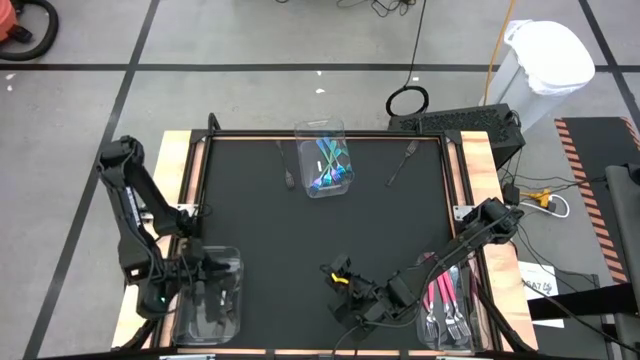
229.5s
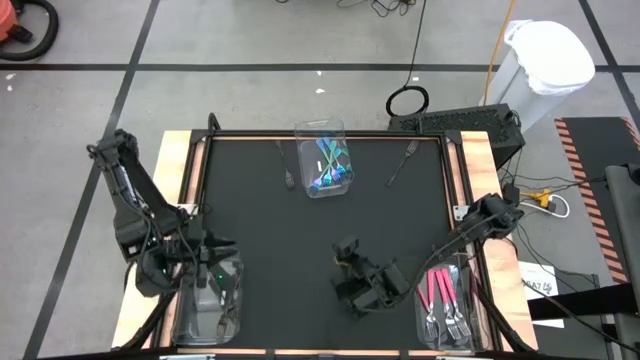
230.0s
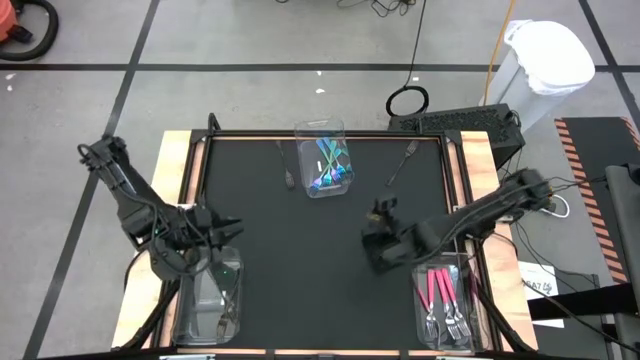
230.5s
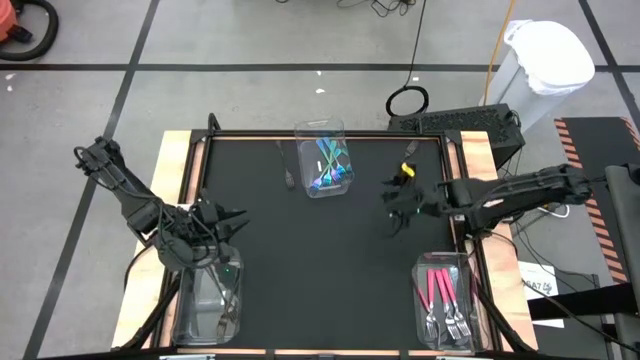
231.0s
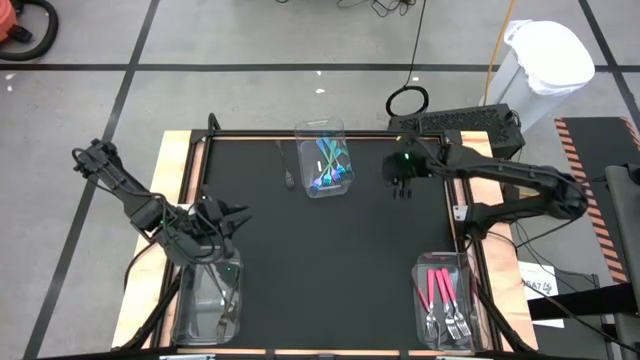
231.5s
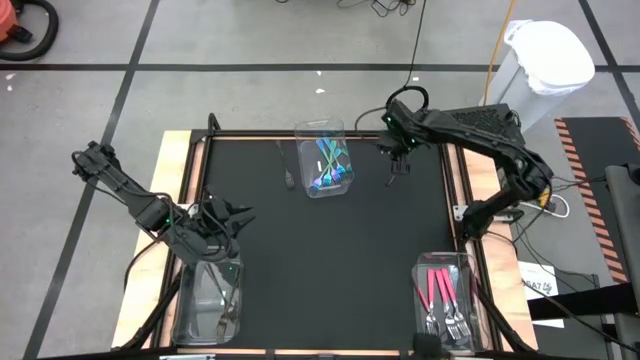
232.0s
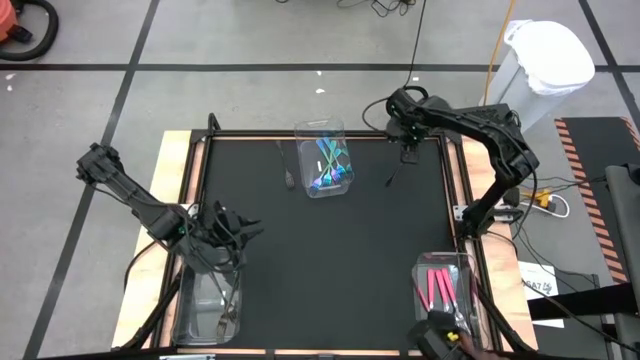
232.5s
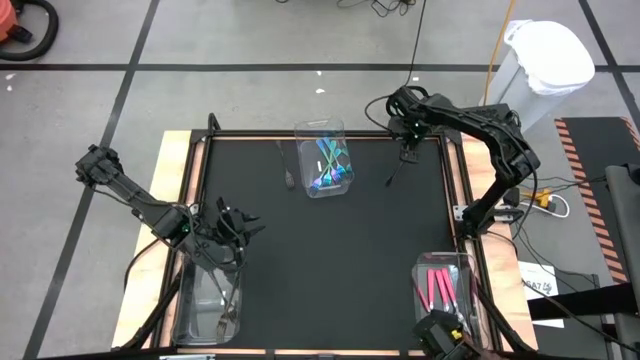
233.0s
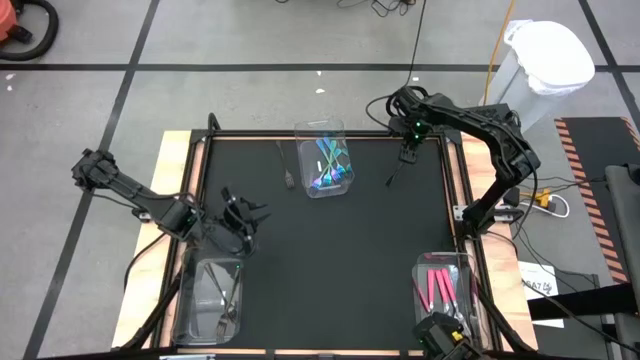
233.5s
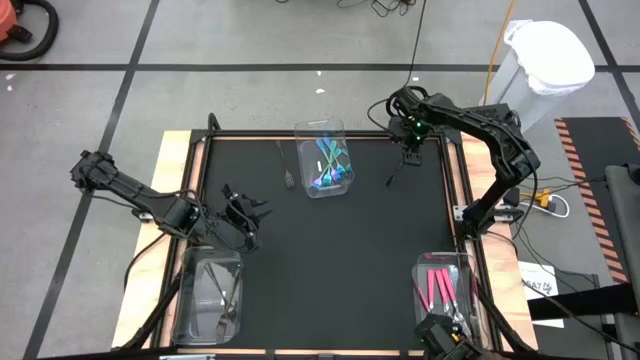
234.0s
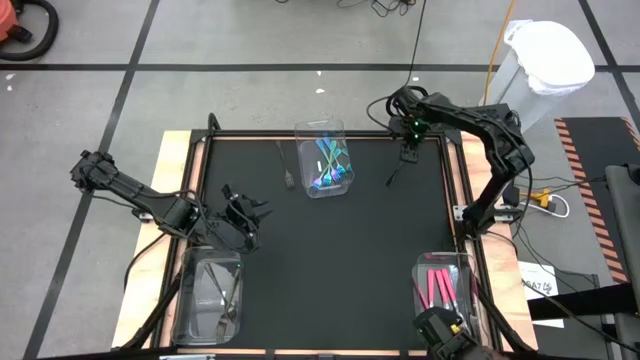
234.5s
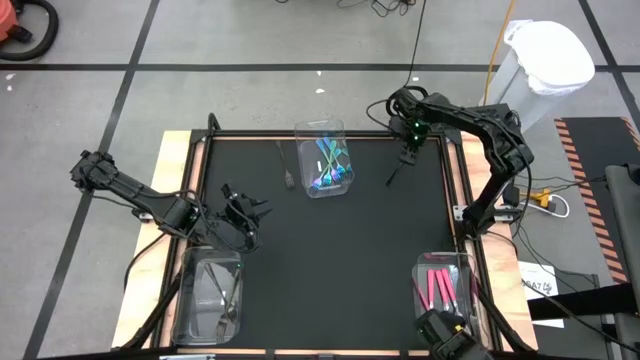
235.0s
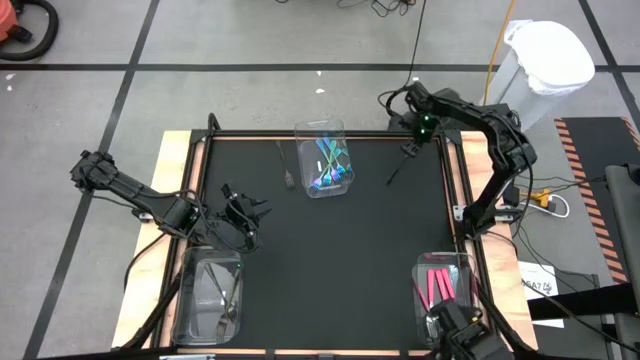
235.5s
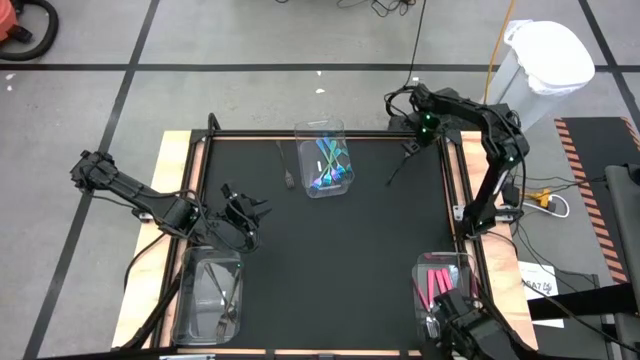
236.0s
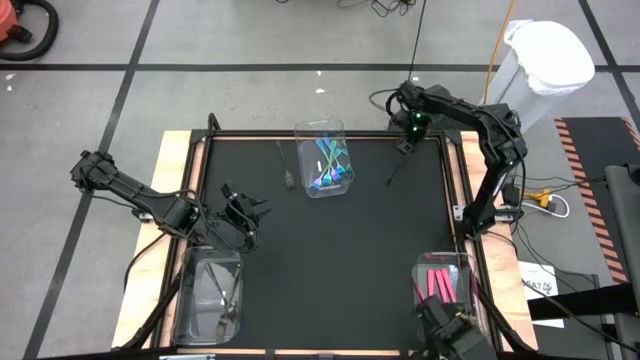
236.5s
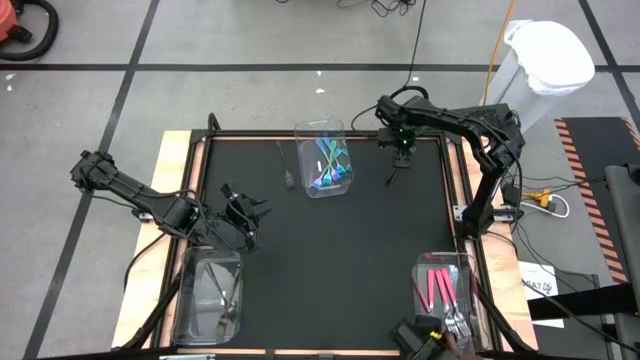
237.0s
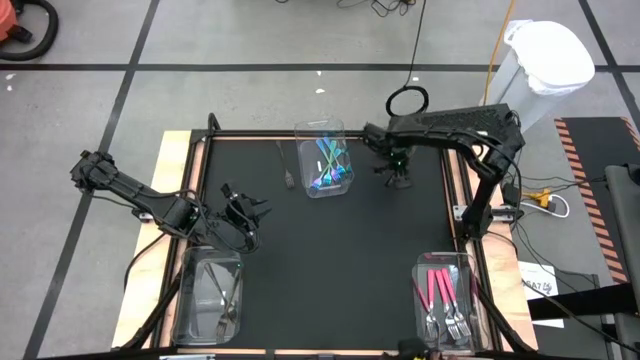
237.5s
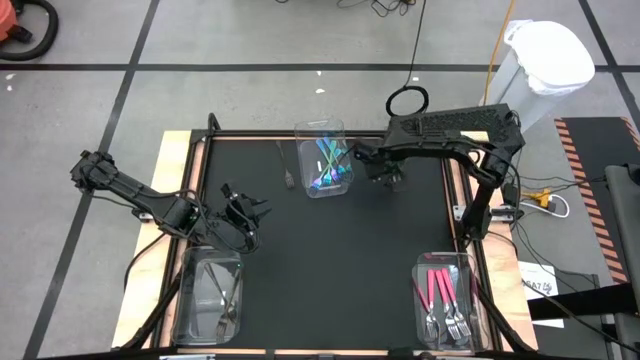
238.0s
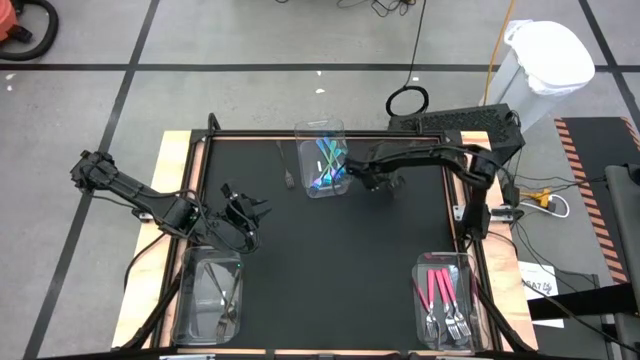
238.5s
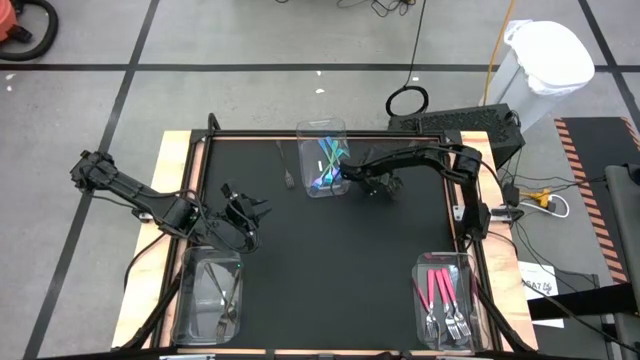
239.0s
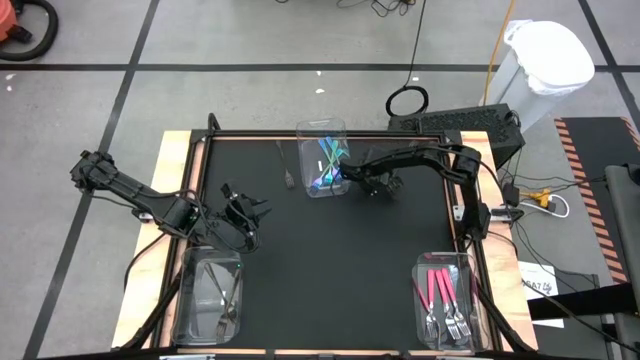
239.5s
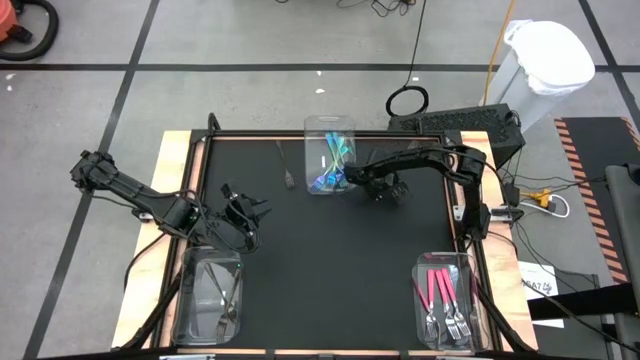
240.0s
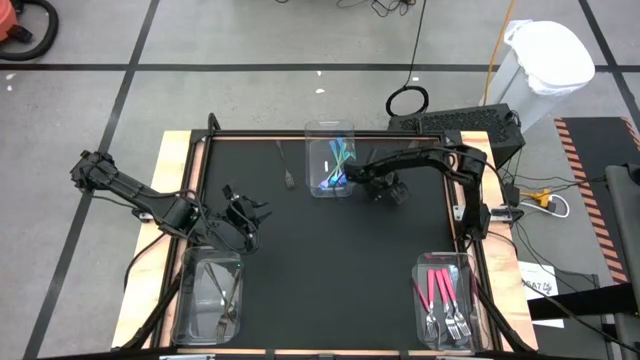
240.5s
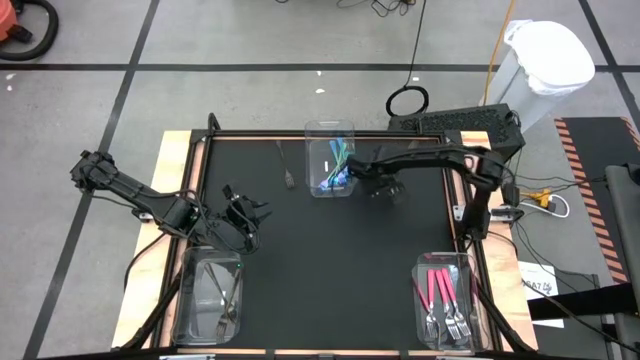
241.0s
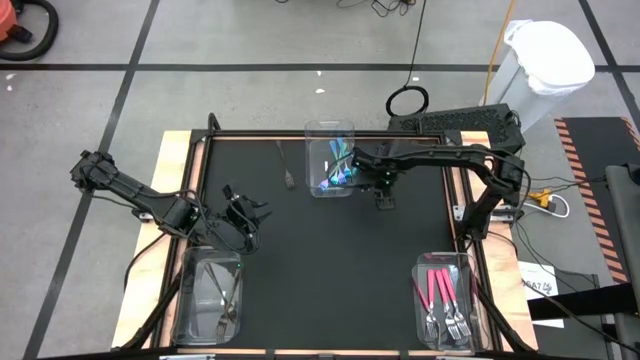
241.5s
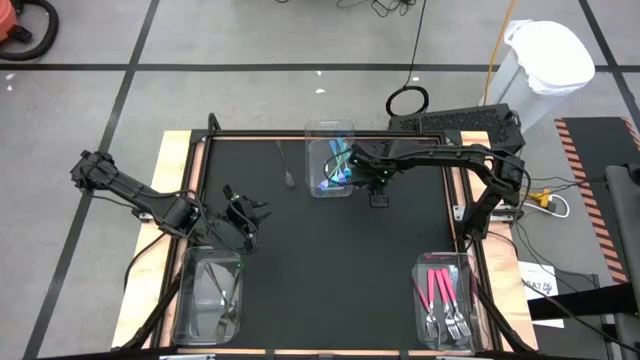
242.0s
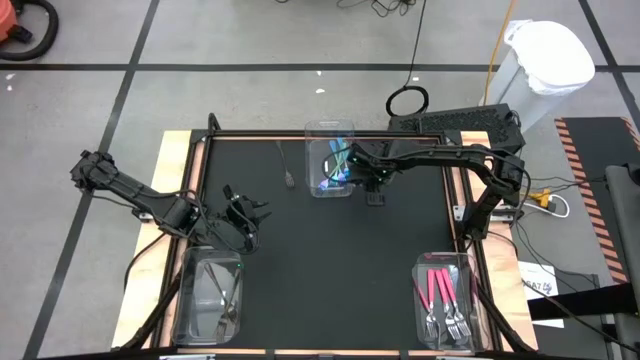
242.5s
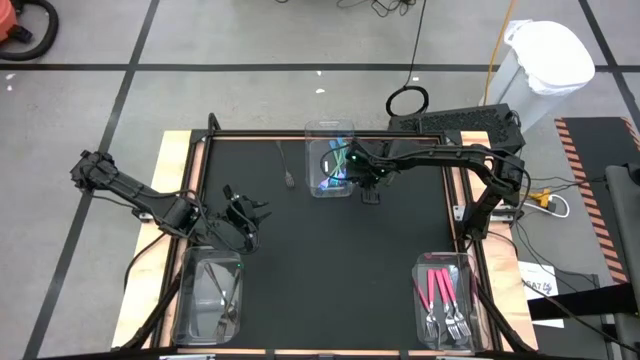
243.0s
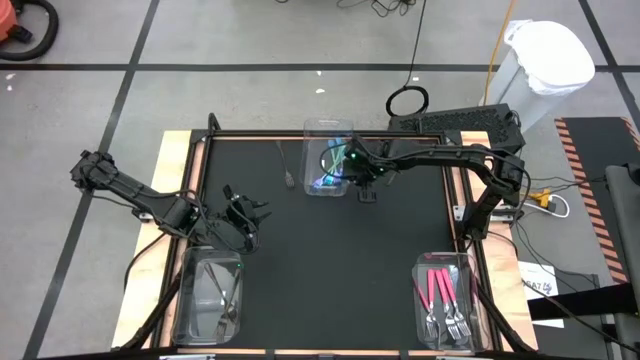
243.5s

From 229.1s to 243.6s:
Task: Sort silverware by color (type)
Adjust the top transparent bin on the table

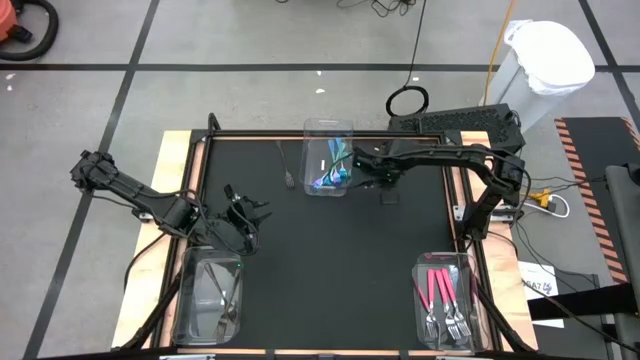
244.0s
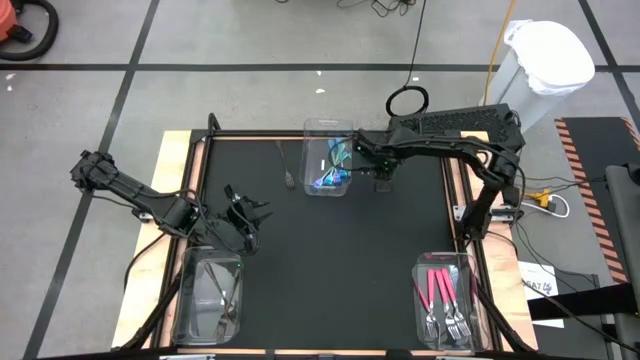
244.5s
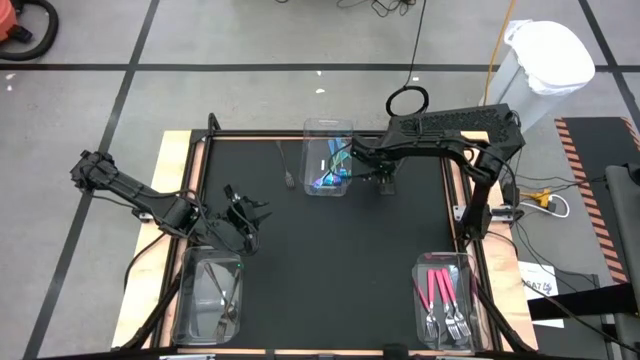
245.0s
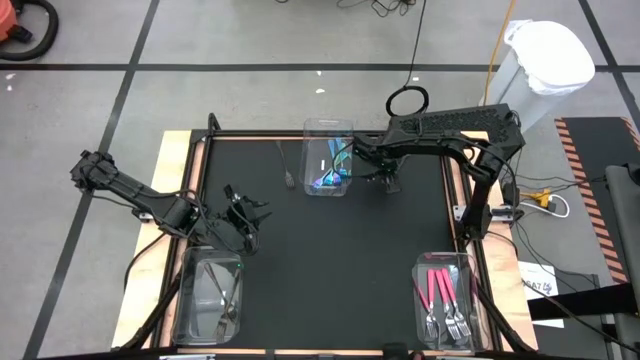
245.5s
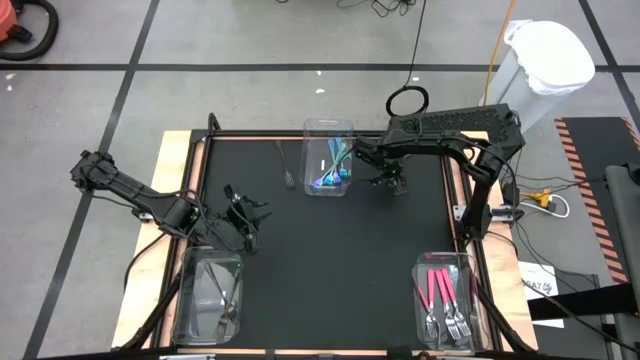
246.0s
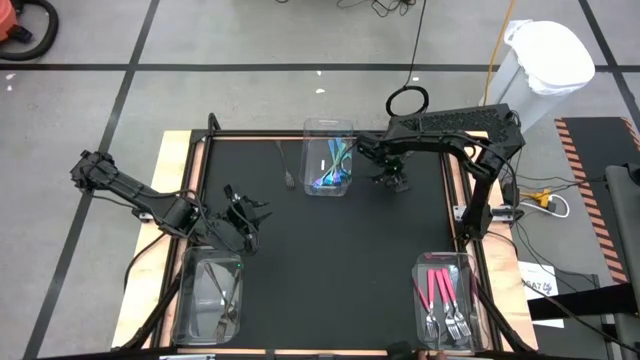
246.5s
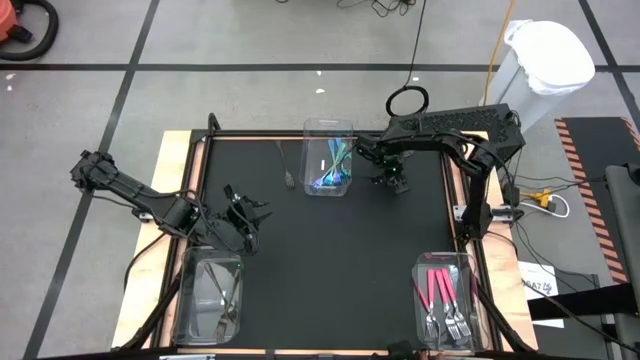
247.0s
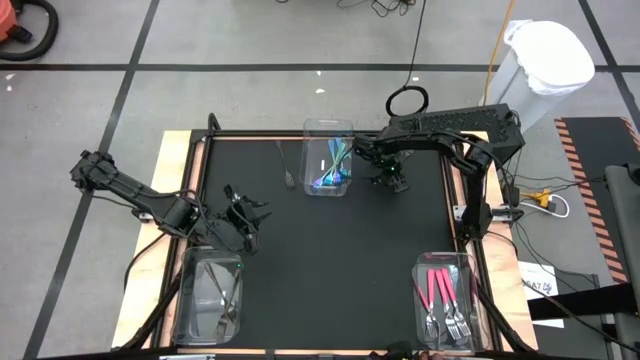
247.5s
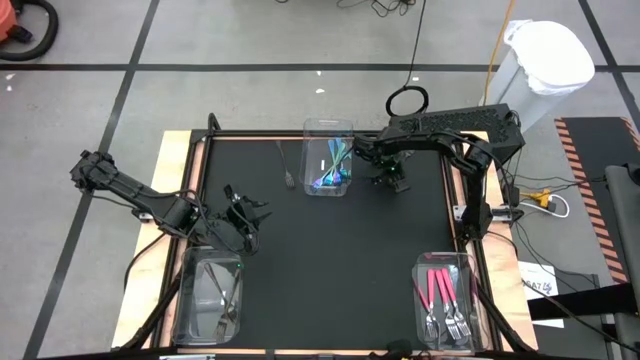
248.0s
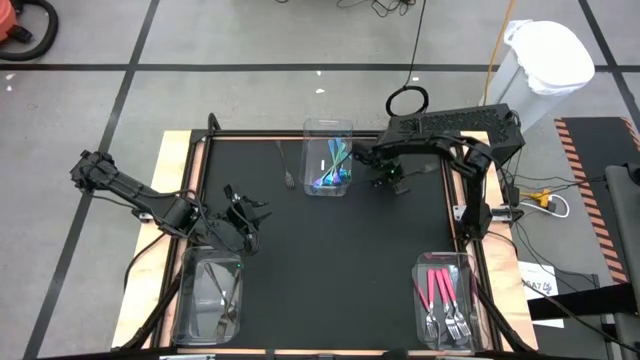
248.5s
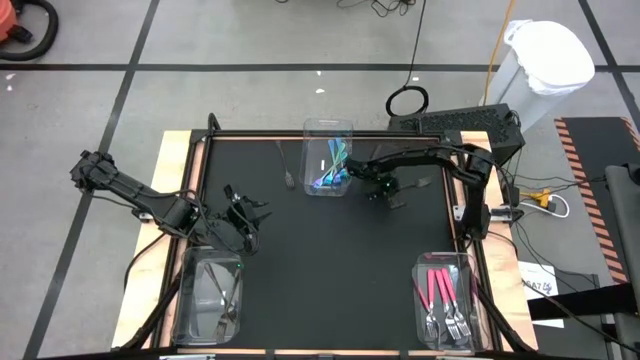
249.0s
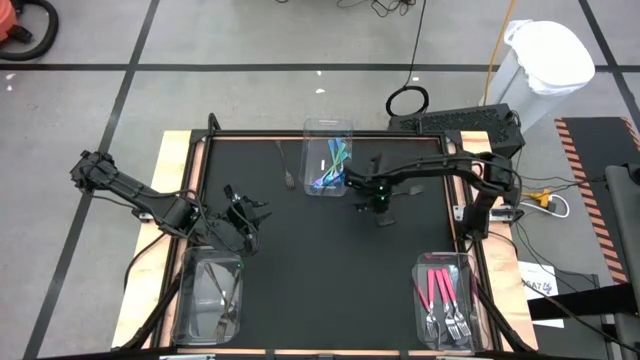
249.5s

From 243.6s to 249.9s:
Put the black fork into the bottom left transparent bin
